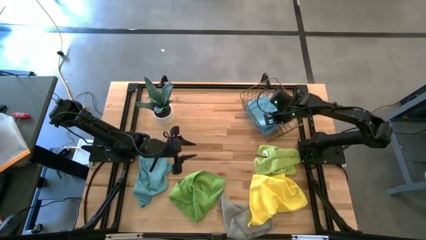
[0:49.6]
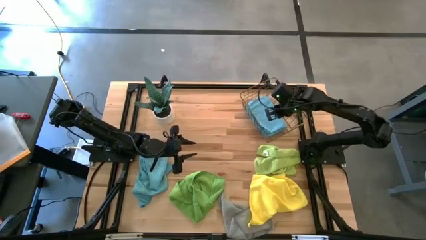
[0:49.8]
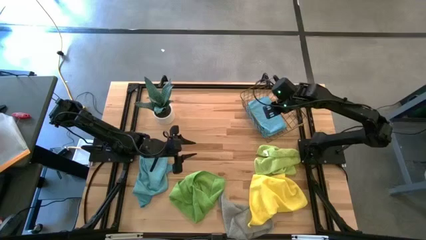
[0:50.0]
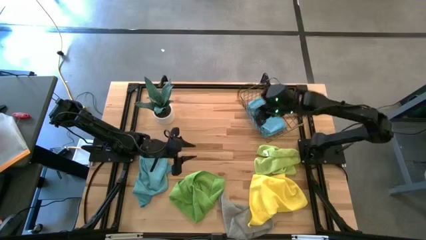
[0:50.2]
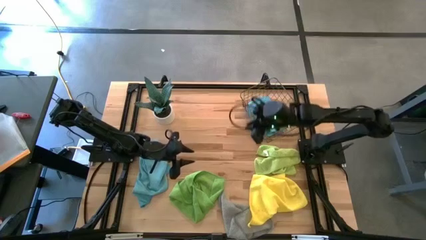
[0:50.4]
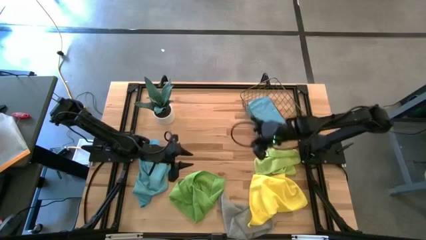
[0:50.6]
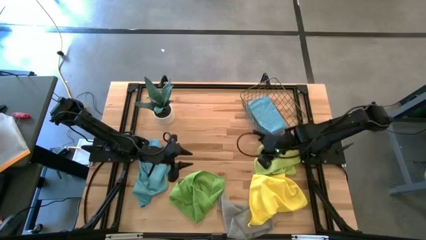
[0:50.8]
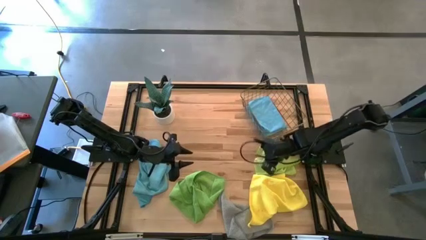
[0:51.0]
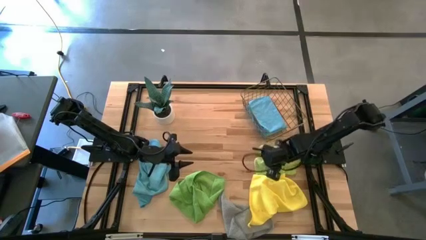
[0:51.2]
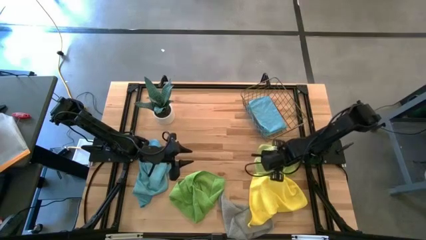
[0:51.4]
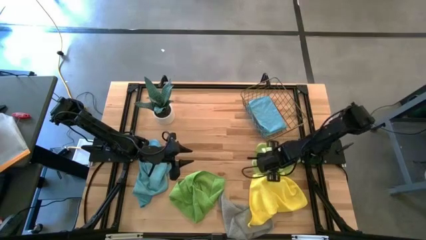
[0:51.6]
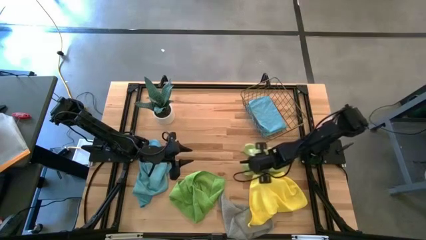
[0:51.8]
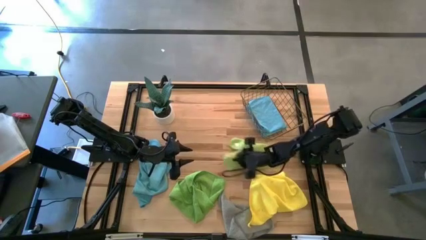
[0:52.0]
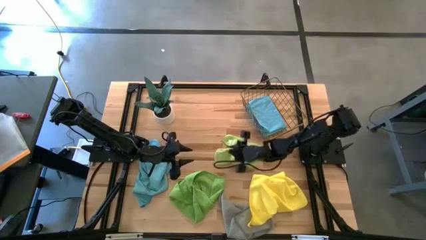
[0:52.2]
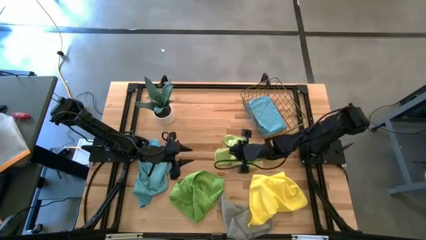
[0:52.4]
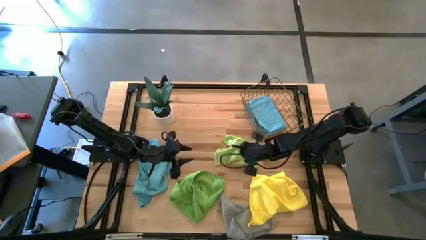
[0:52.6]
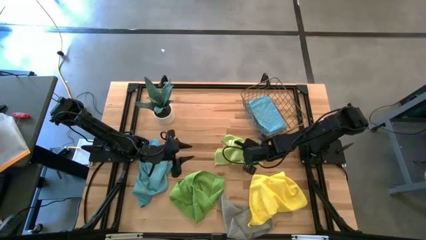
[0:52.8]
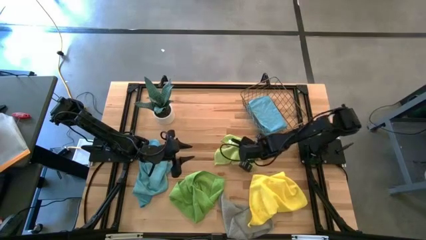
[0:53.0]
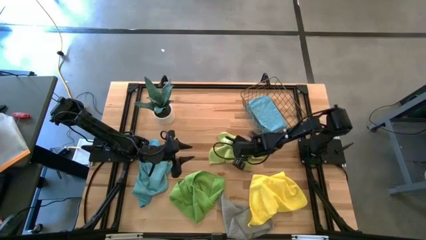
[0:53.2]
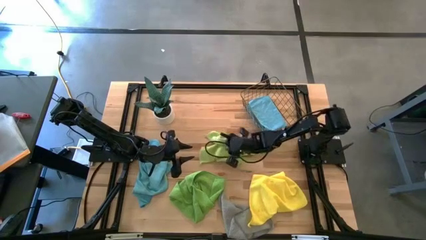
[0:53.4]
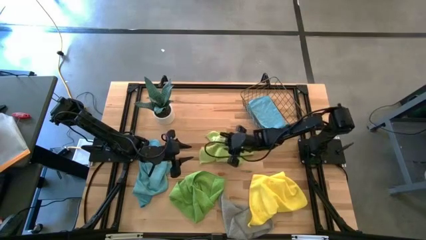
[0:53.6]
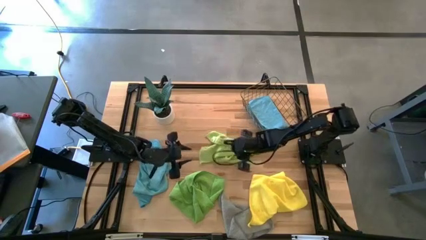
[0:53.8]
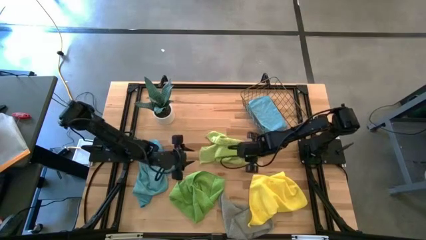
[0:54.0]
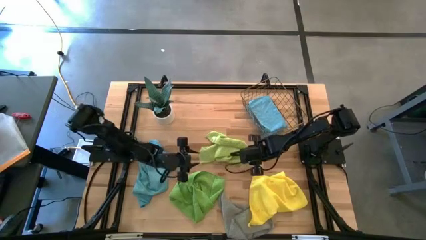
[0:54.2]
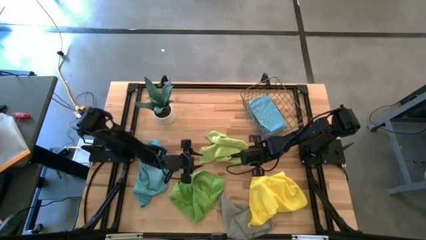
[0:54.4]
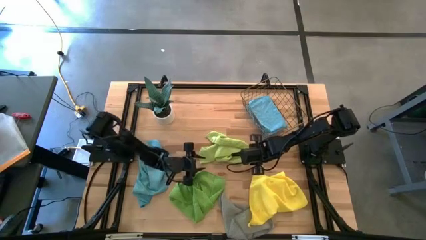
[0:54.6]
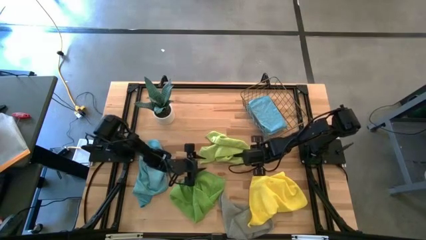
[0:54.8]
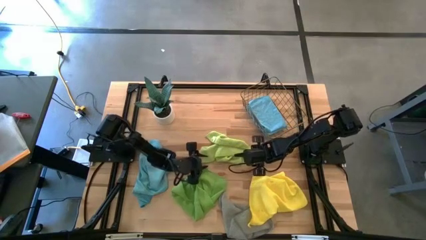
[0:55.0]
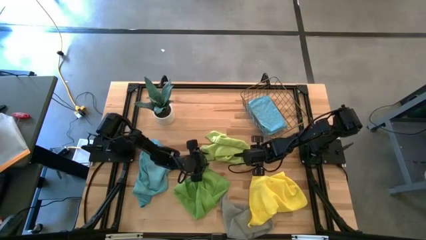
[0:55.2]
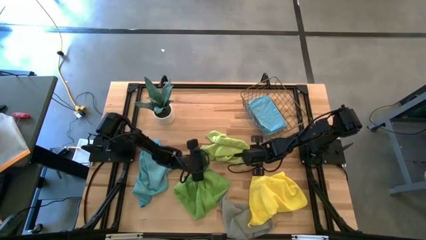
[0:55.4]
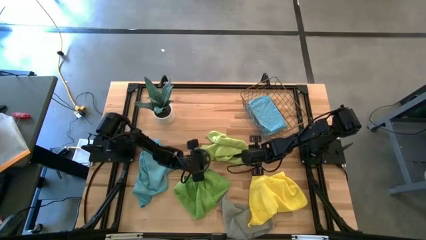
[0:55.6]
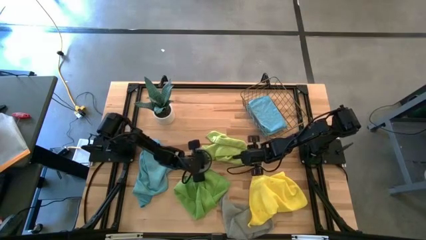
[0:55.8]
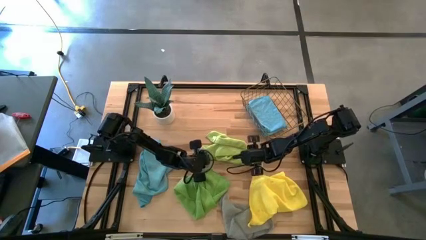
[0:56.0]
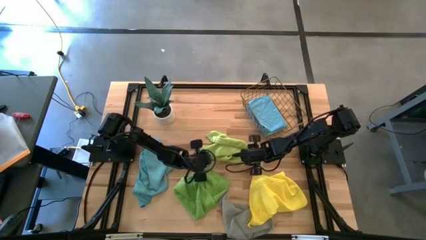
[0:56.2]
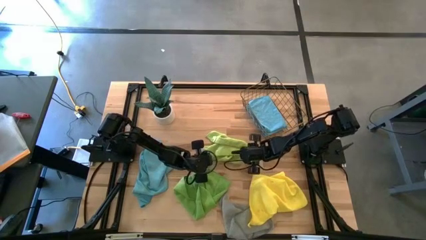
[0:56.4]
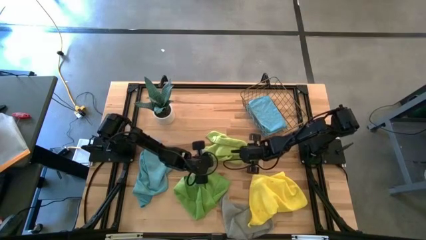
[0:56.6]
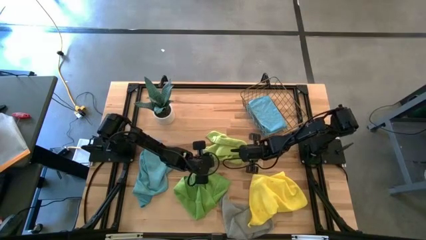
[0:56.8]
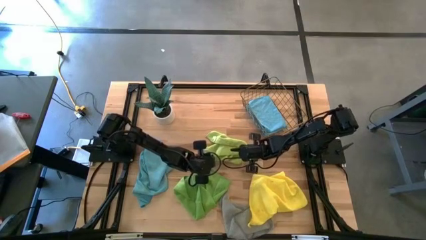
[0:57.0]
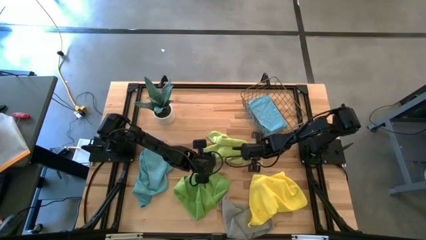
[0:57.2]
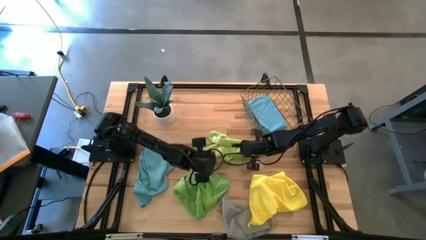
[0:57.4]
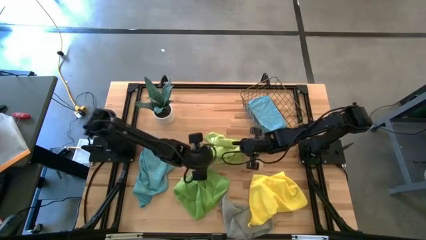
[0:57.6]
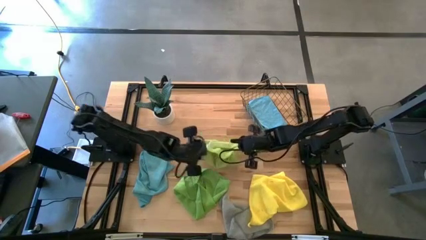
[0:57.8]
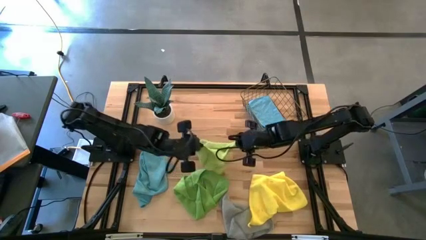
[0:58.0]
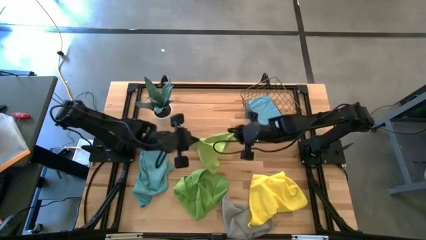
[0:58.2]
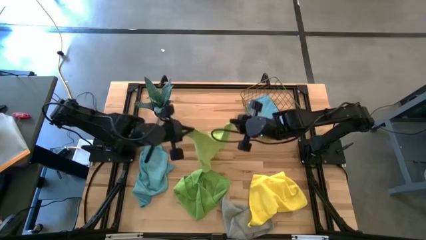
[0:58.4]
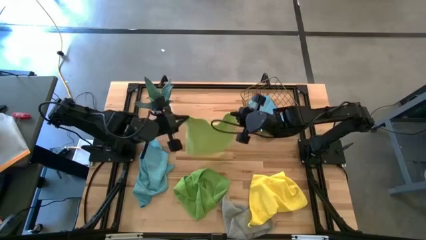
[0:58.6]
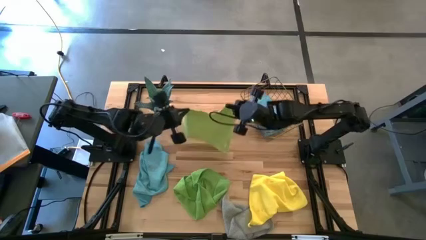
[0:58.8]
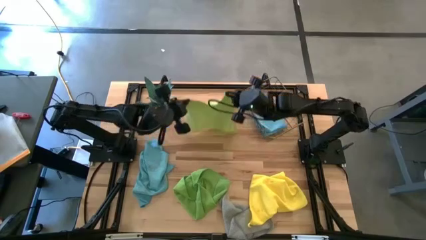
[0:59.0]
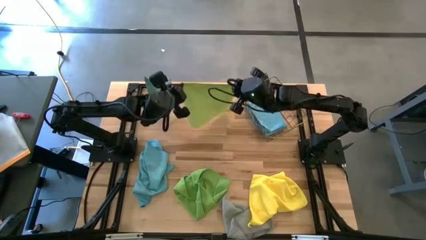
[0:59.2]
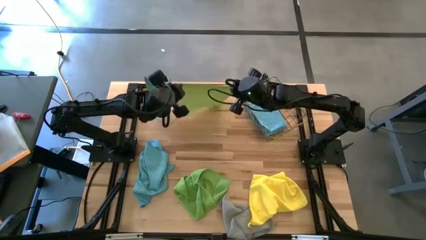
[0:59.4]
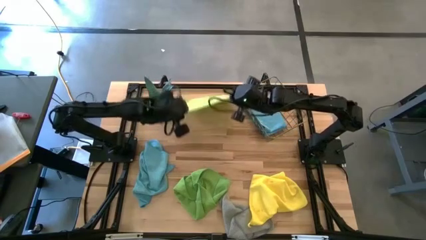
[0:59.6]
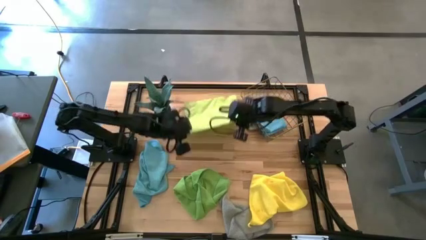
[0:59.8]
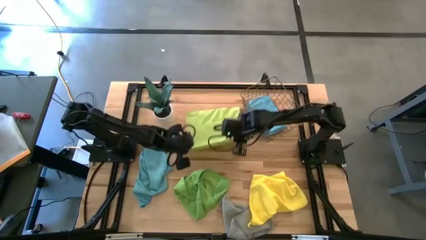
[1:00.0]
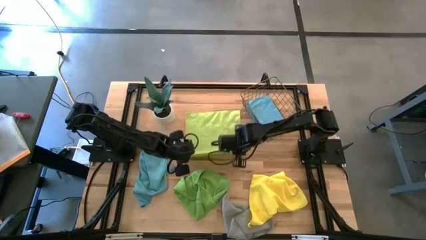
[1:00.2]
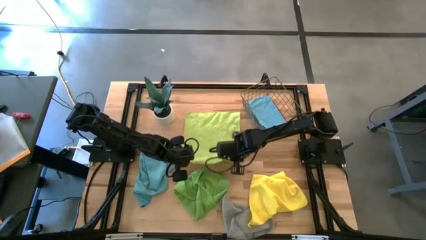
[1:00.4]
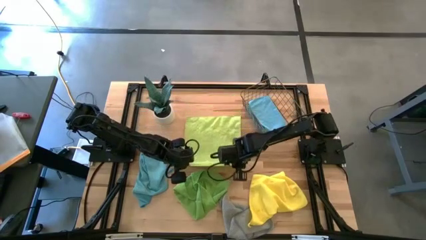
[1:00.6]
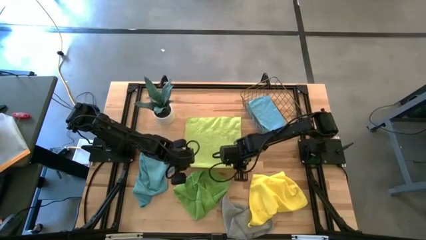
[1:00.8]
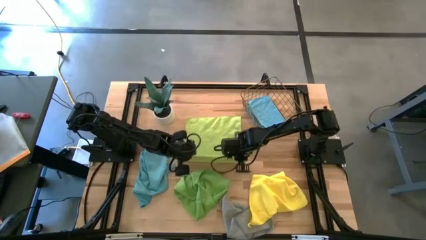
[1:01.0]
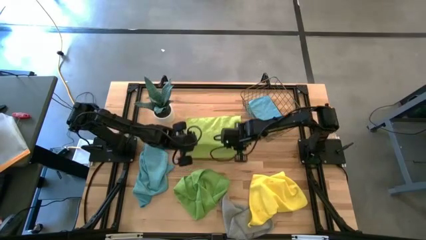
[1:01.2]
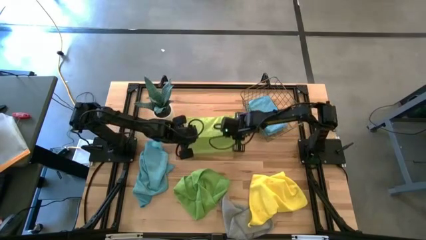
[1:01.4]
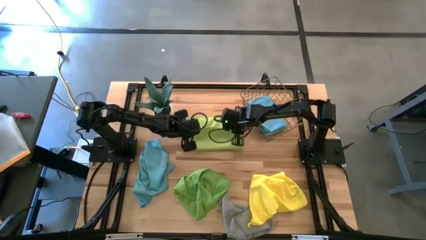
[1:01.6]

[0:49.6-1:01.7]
Task: Fold microfiber towels
Fold the light green towel
